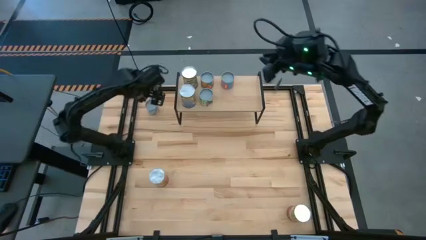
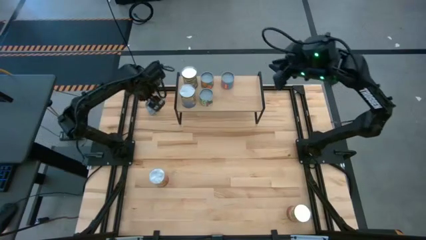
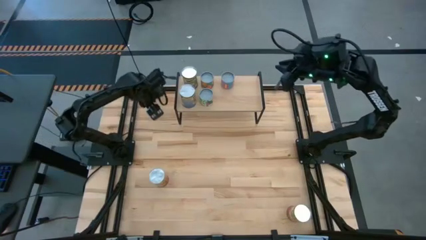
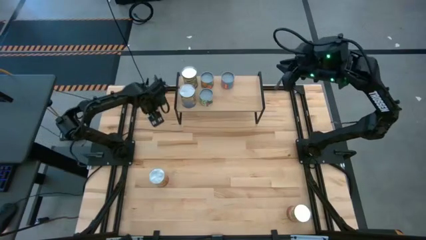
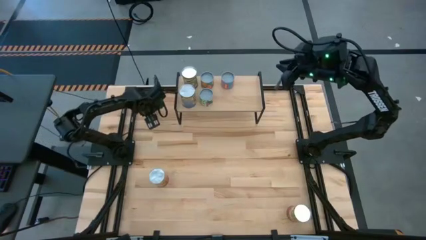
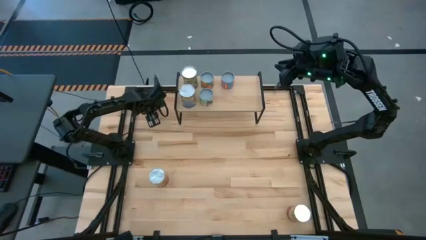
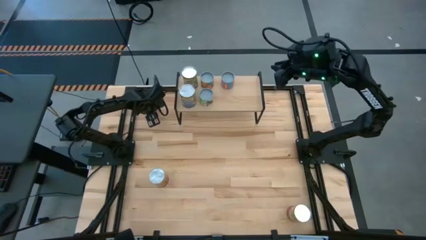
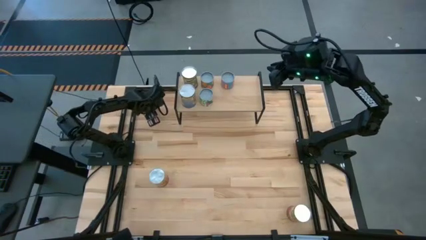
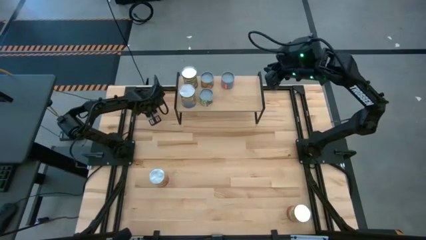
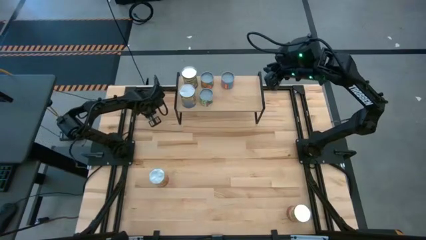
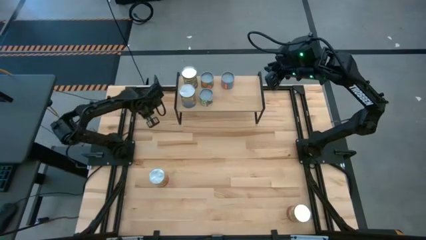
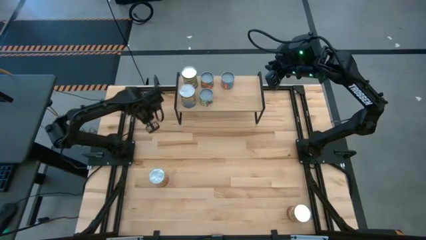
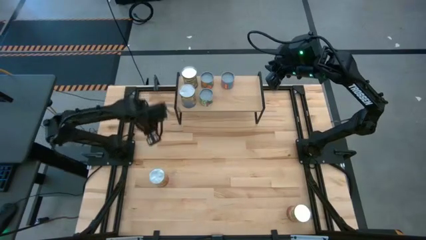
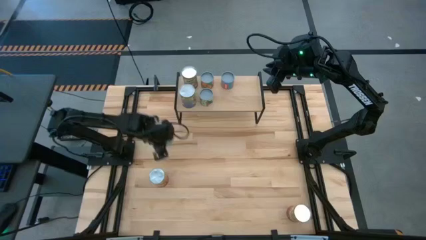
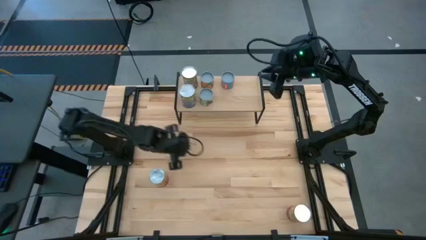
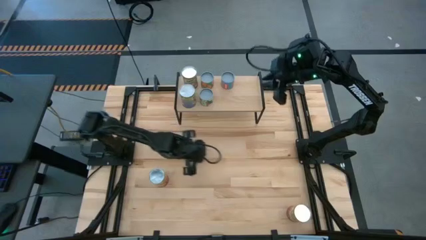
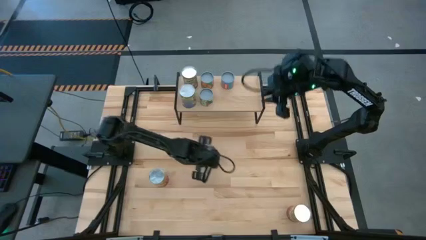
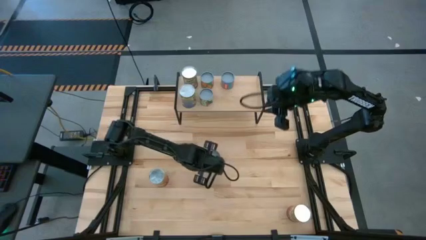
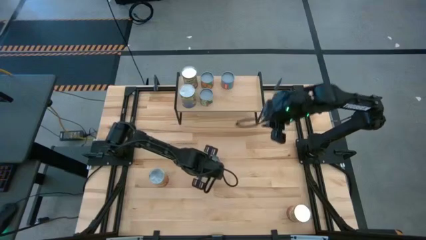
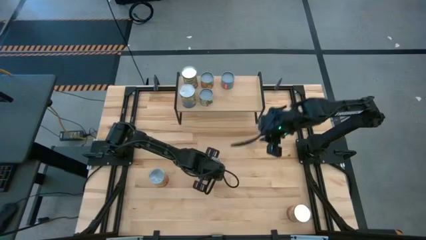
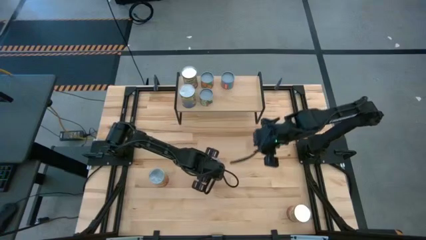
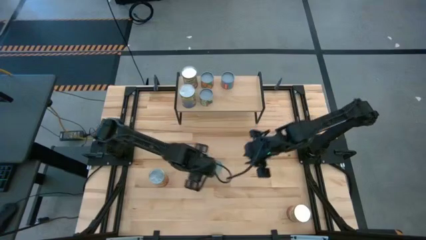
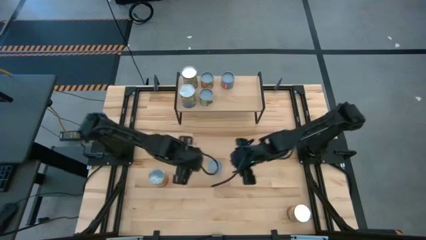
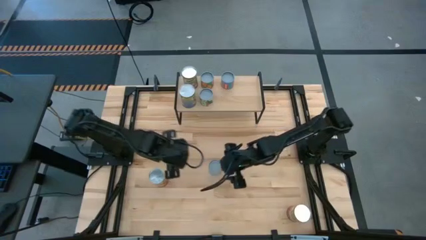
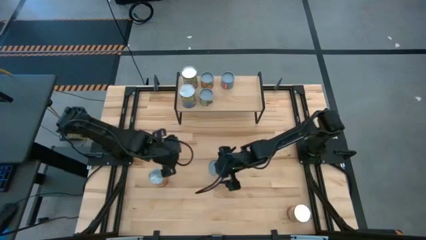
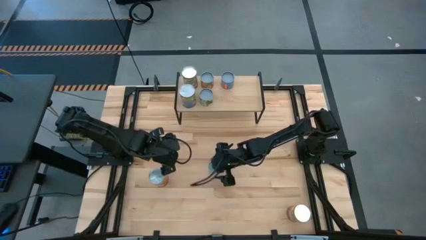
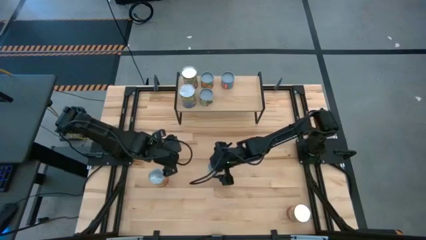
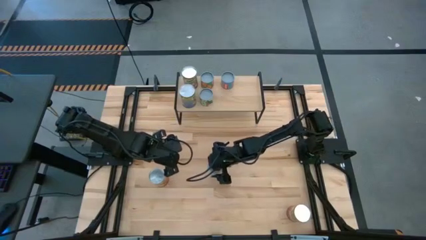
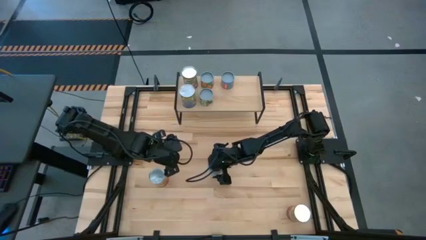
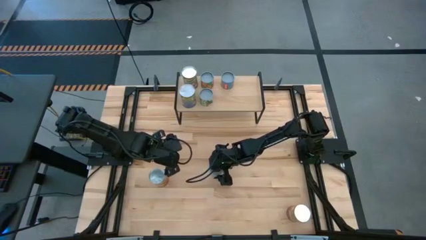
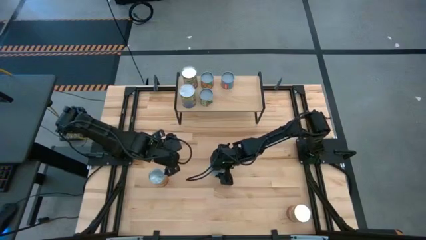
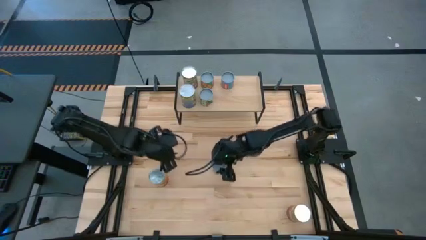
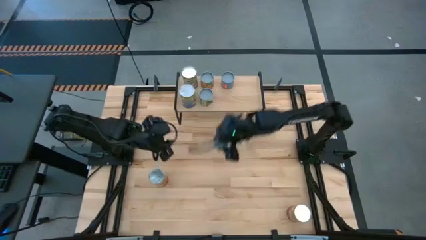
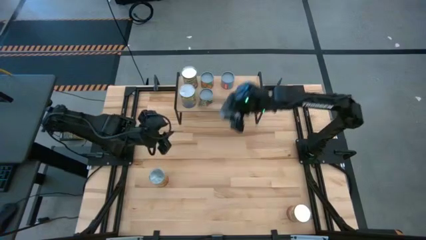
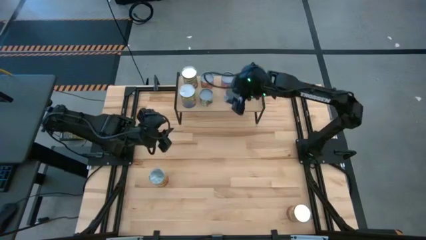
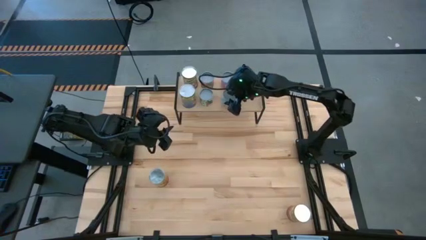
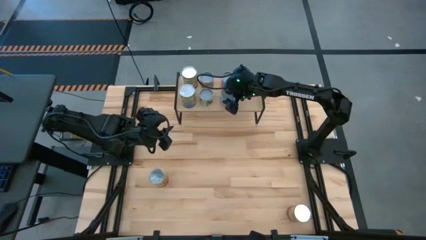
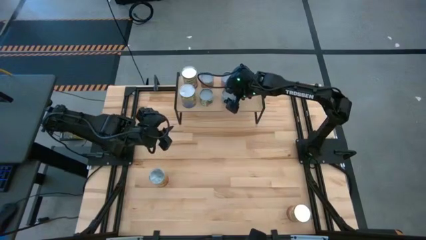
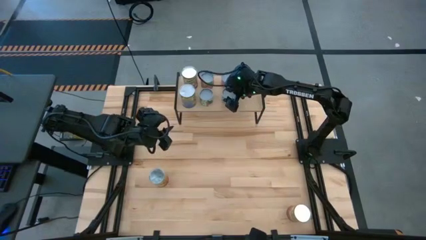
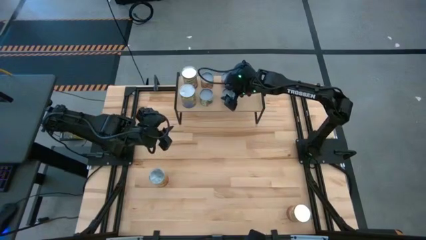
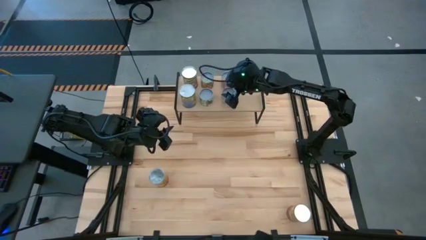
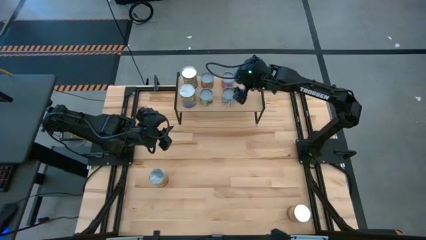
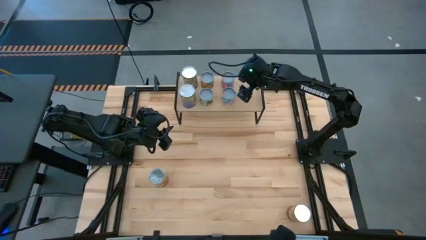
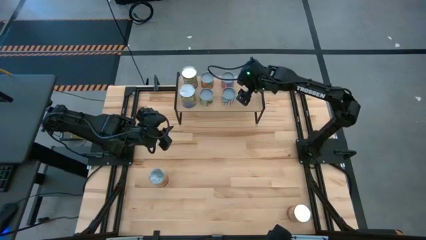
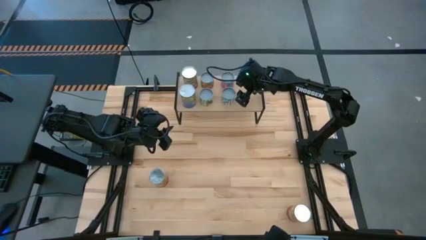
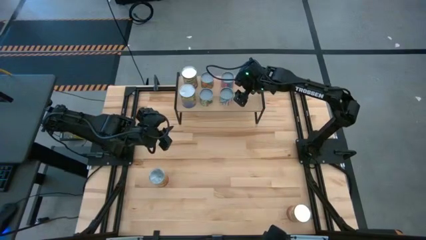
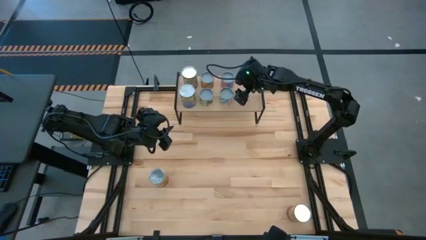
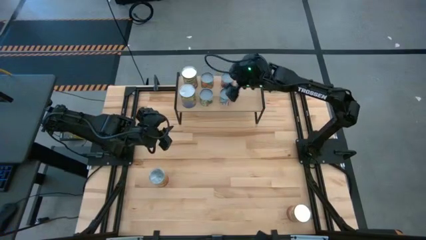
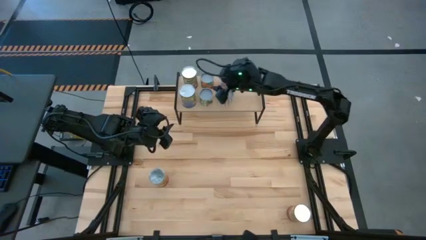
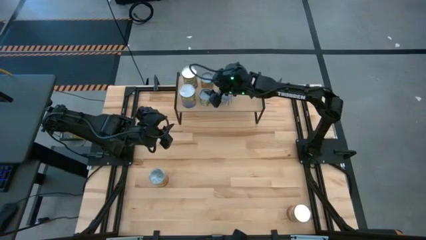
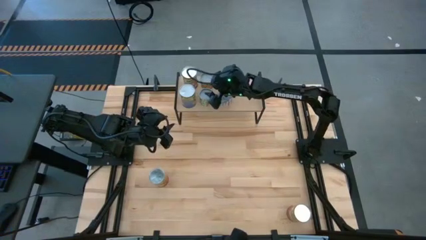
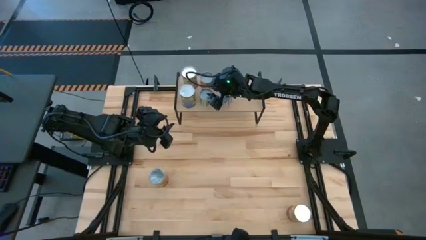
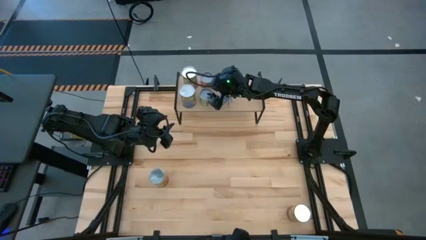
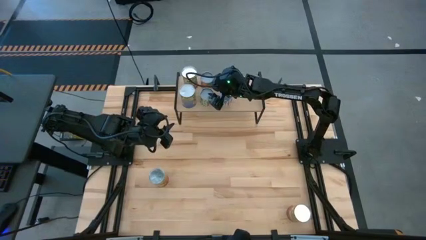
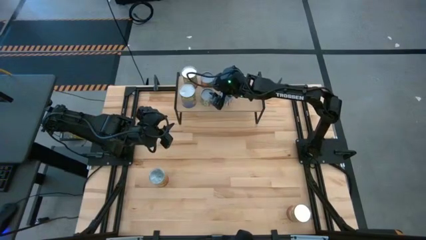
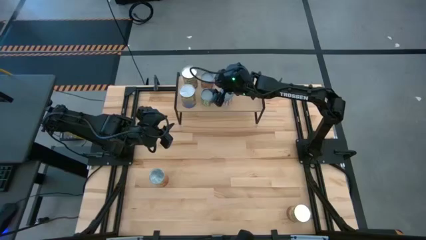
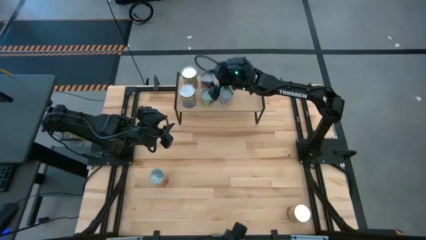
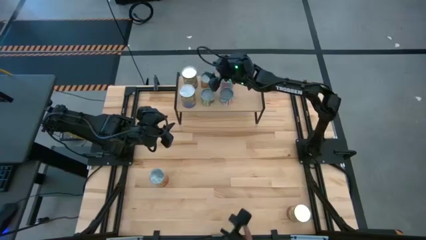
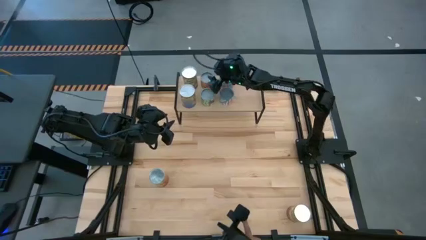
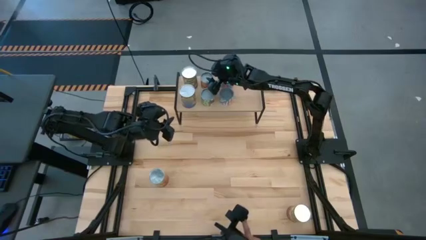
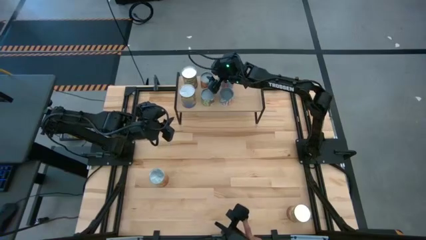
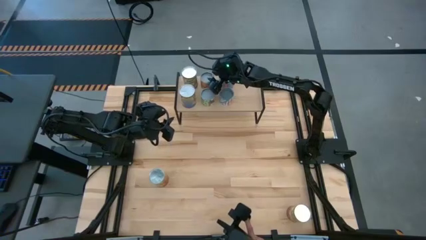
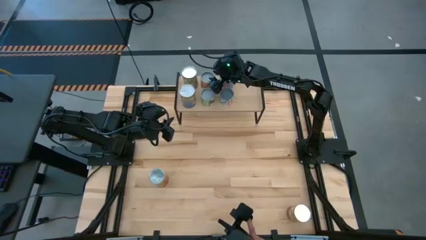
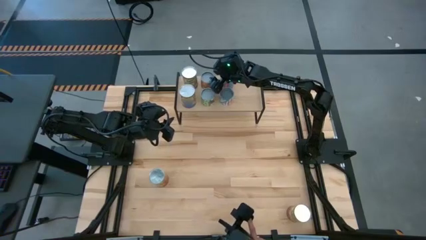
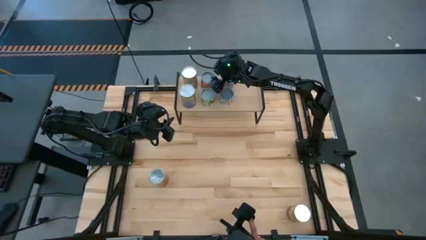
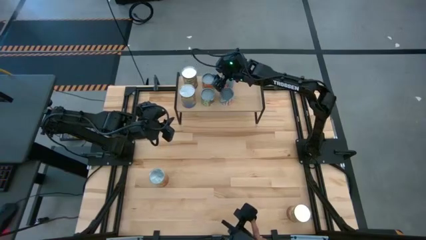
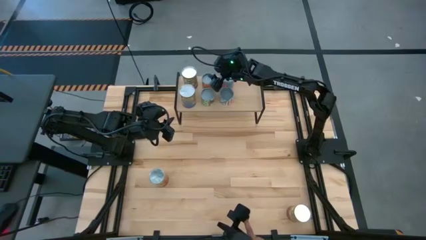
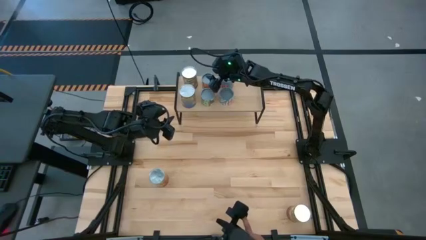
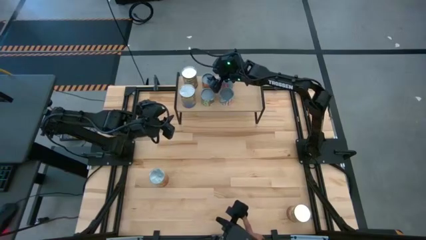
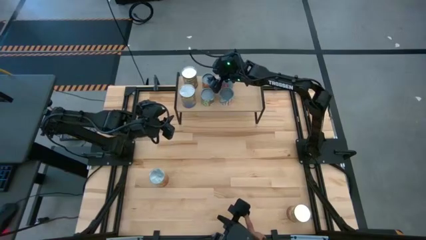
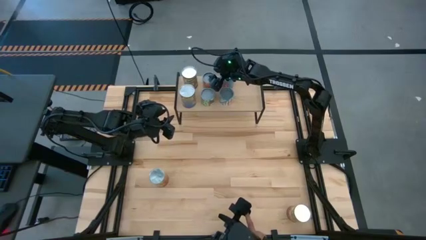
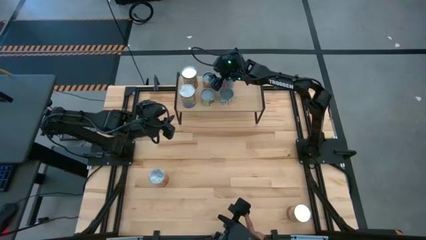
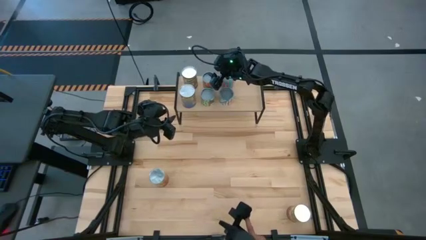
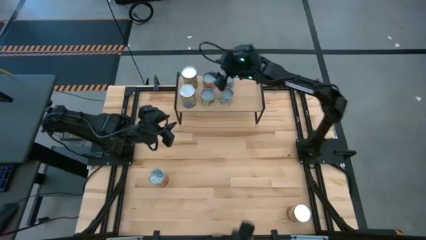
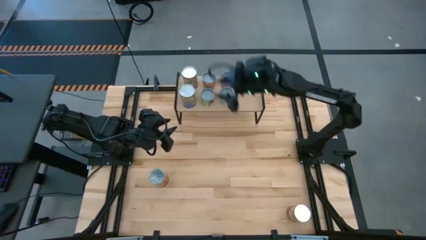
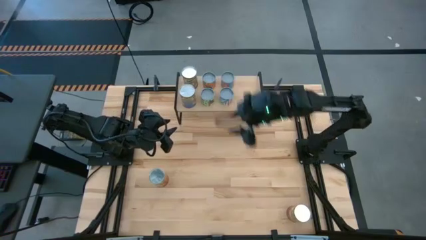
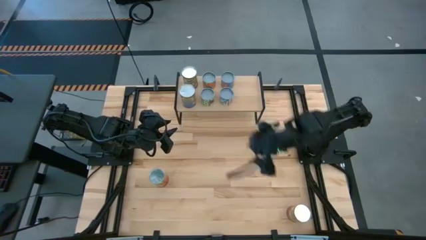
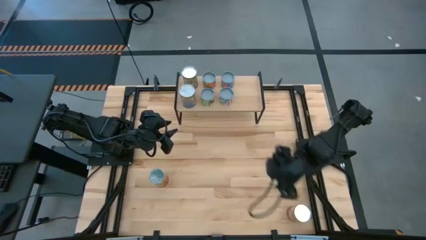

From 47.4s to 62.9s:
Task: Pick and place cans onto a shelf
Put the carrot can on top of the shelf

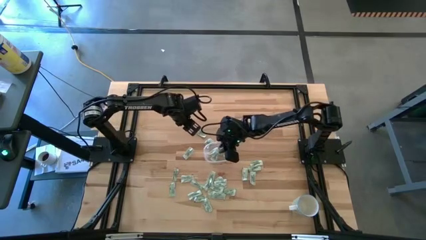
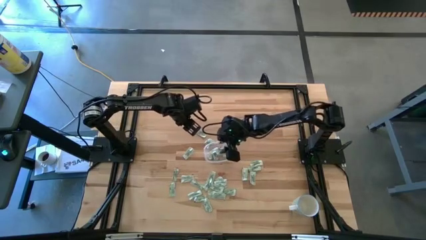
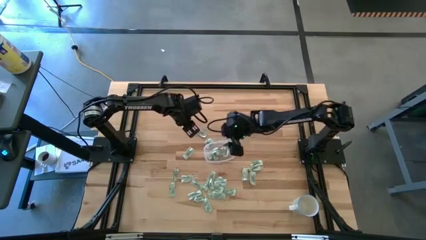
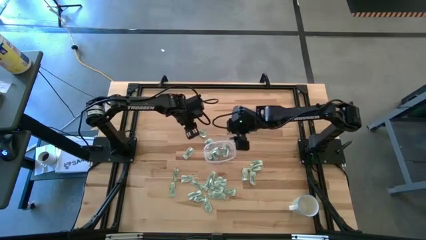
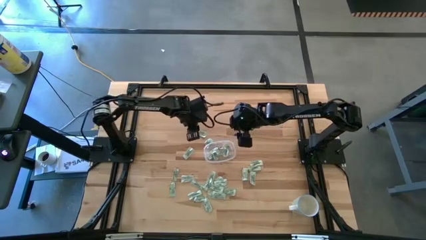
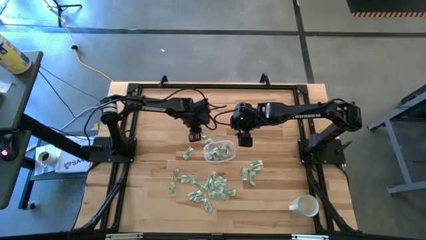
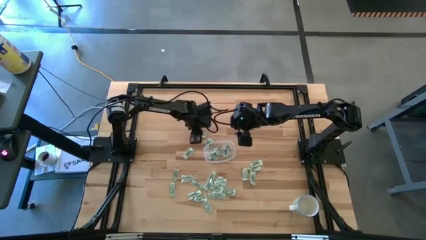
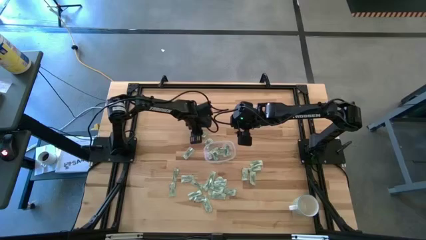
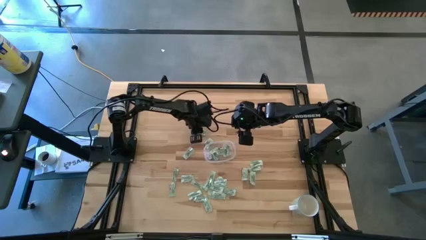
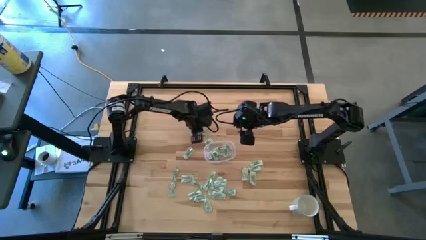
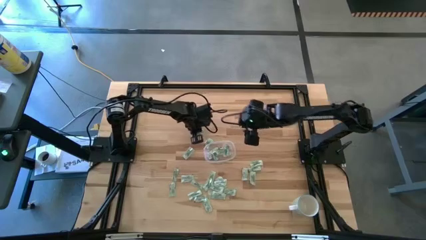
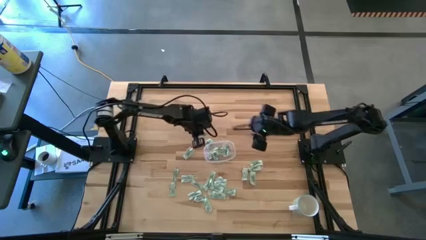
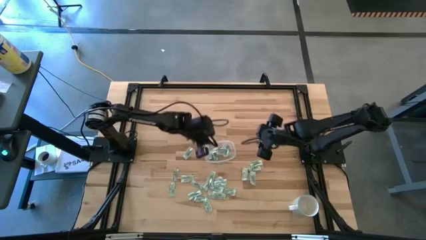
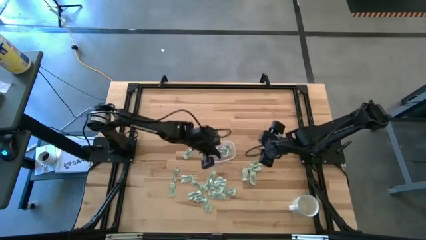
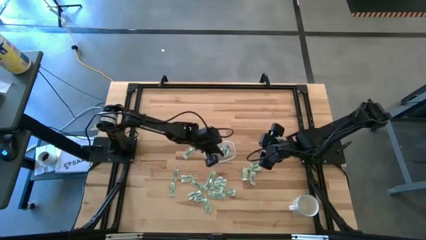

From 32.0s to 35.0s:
Task: Pick and place Stevia / Truvia into bins
Put the stevia packet into the transparent container
